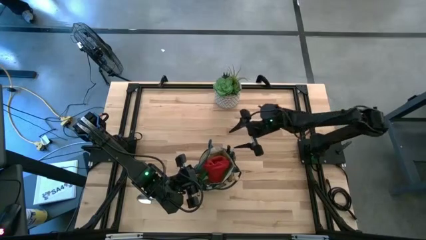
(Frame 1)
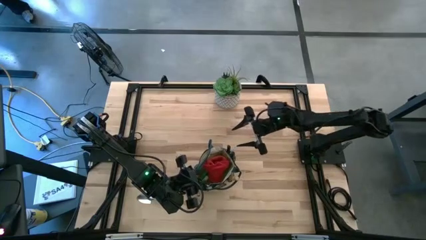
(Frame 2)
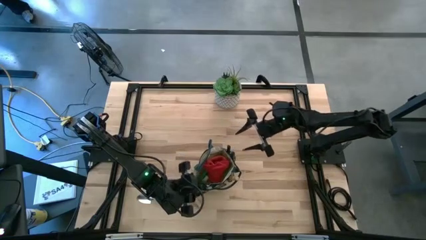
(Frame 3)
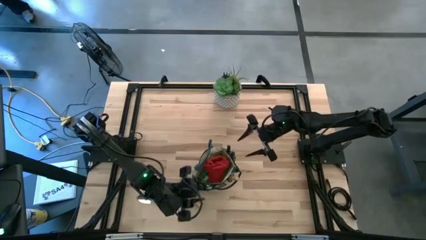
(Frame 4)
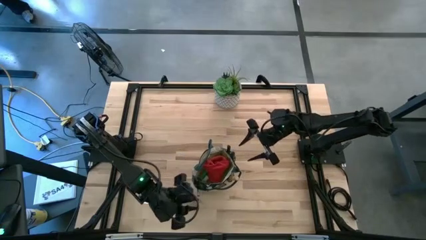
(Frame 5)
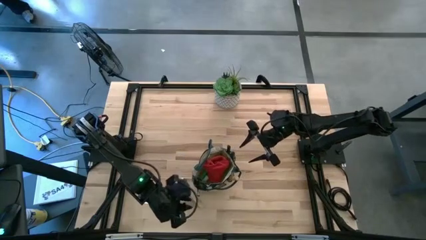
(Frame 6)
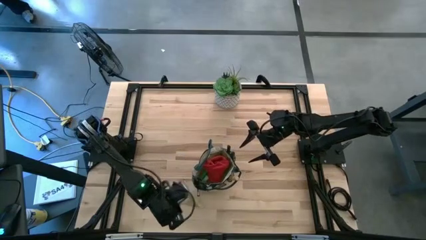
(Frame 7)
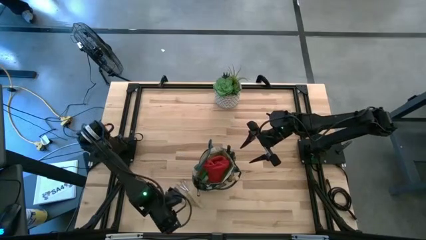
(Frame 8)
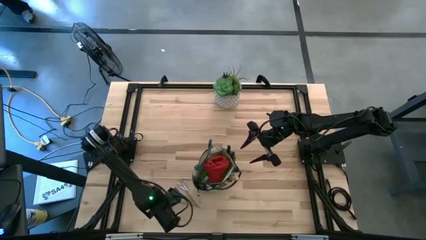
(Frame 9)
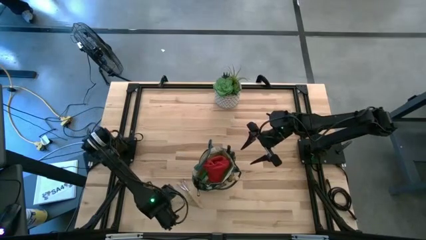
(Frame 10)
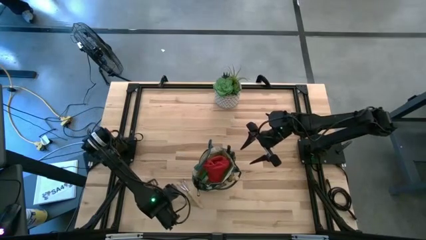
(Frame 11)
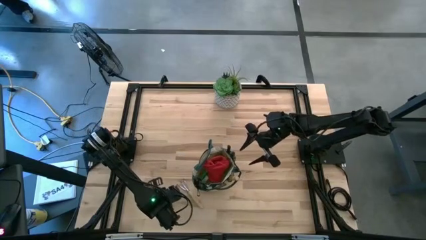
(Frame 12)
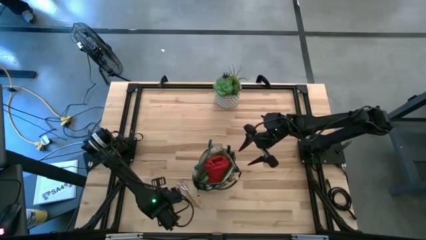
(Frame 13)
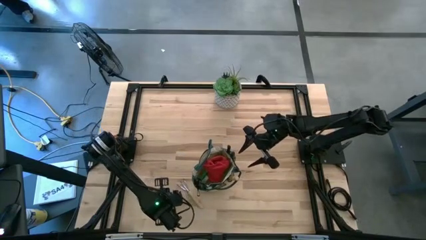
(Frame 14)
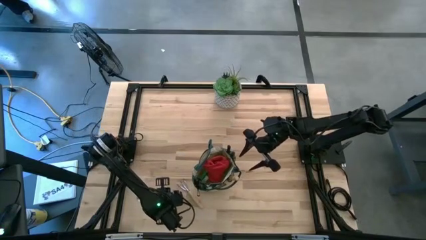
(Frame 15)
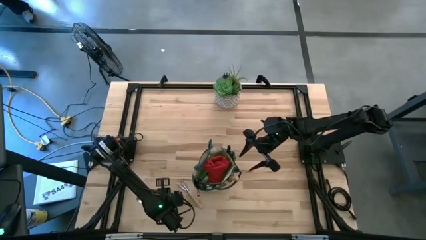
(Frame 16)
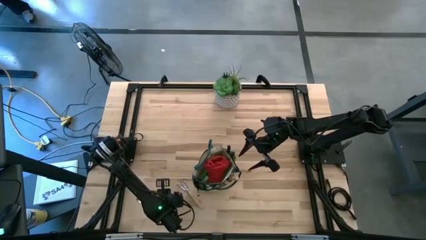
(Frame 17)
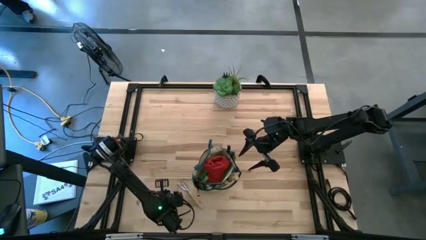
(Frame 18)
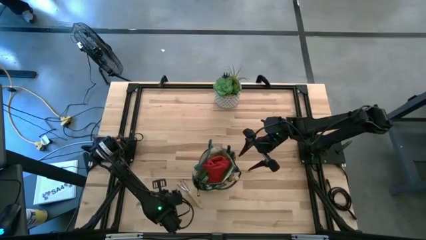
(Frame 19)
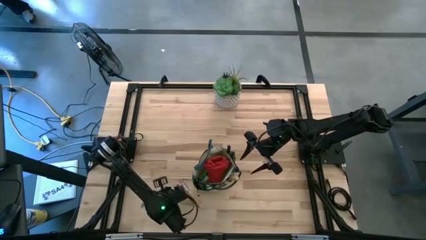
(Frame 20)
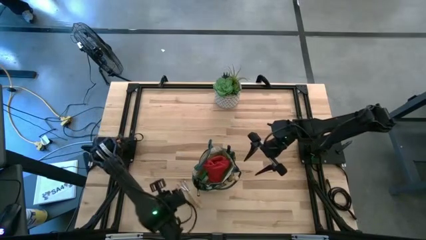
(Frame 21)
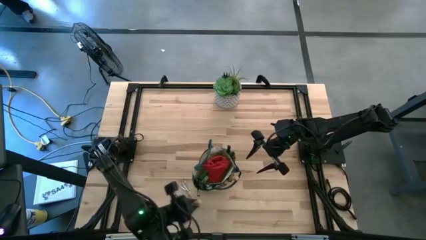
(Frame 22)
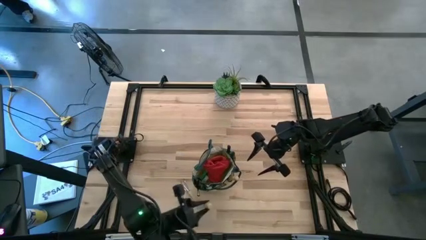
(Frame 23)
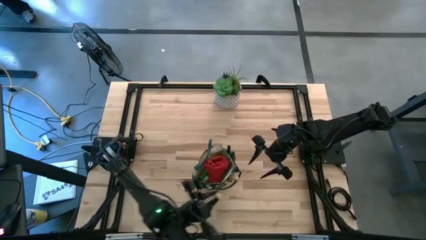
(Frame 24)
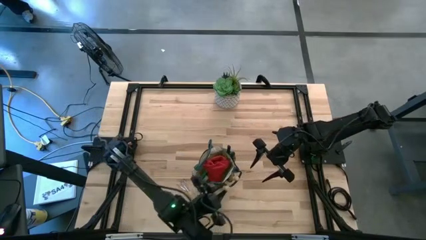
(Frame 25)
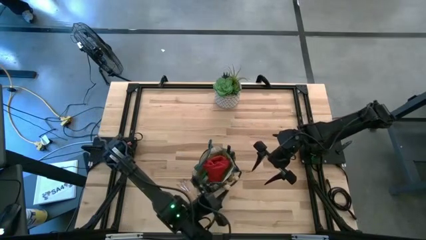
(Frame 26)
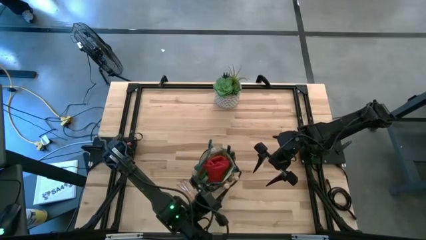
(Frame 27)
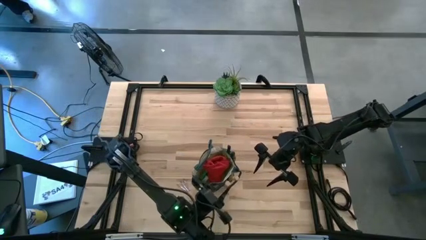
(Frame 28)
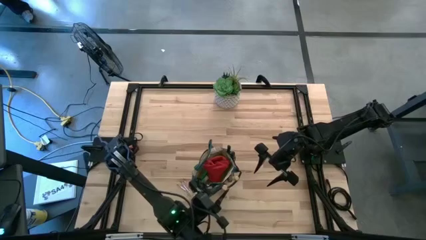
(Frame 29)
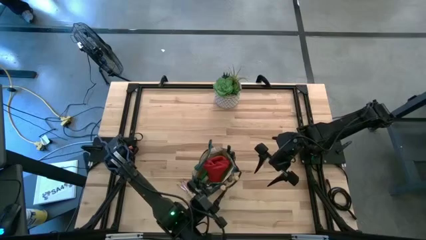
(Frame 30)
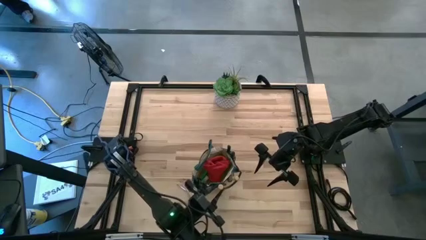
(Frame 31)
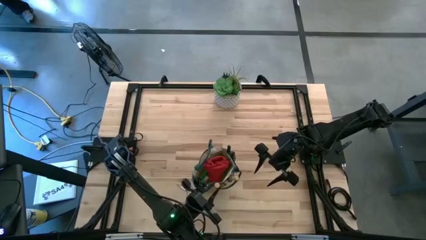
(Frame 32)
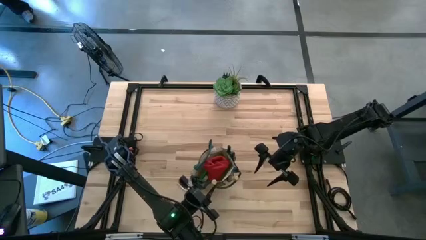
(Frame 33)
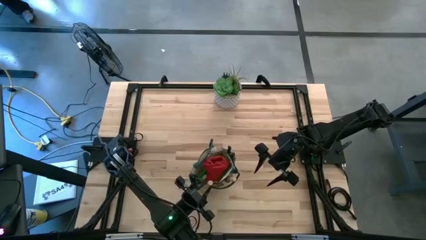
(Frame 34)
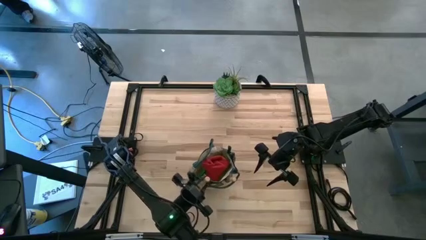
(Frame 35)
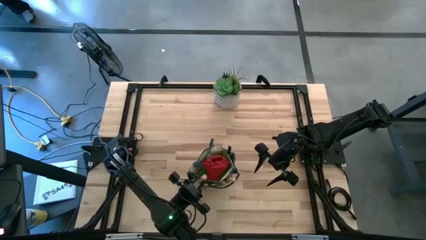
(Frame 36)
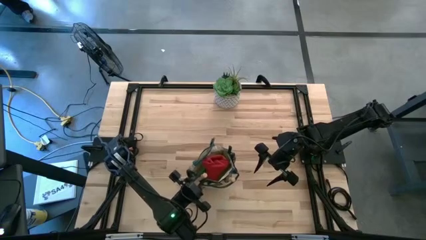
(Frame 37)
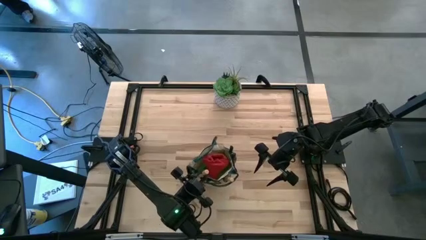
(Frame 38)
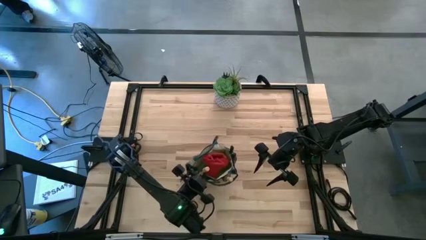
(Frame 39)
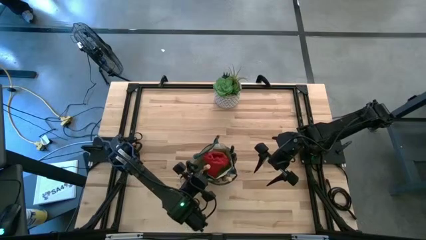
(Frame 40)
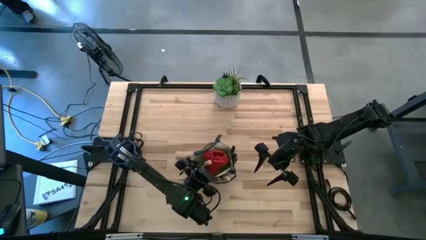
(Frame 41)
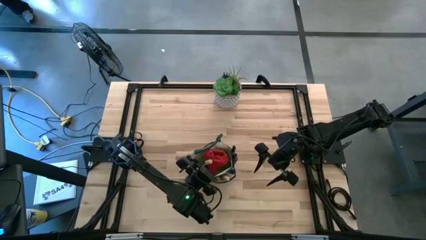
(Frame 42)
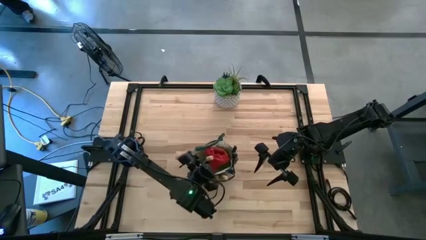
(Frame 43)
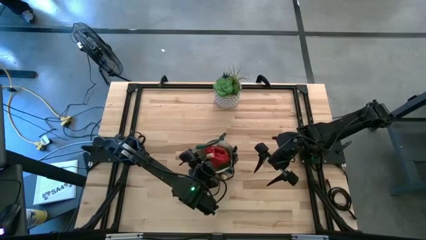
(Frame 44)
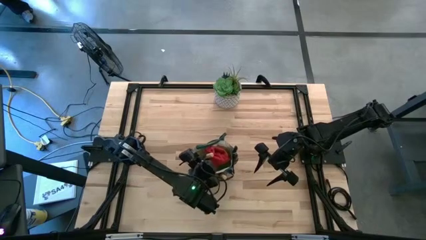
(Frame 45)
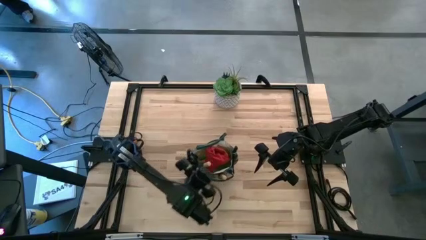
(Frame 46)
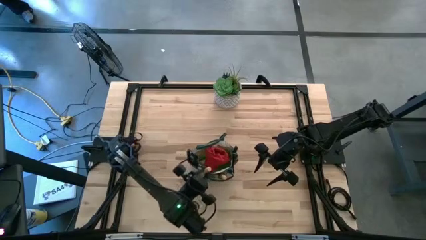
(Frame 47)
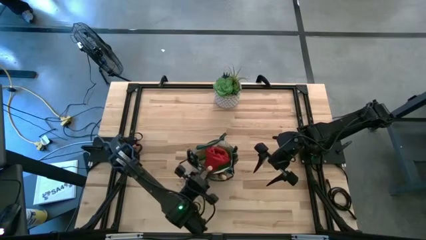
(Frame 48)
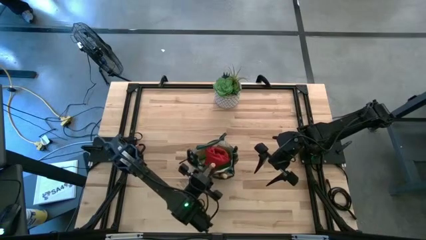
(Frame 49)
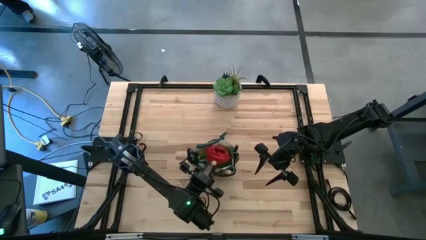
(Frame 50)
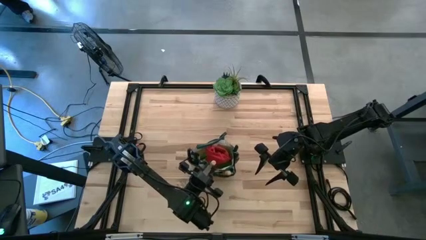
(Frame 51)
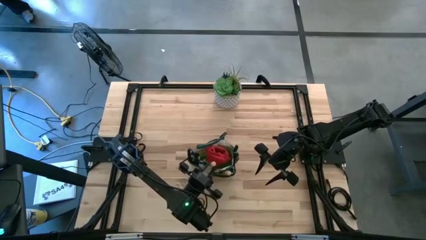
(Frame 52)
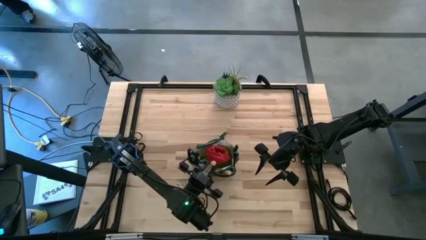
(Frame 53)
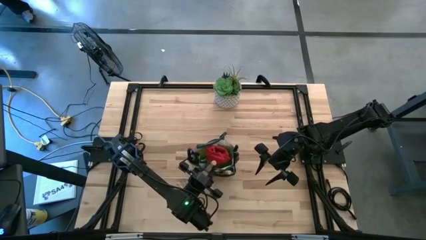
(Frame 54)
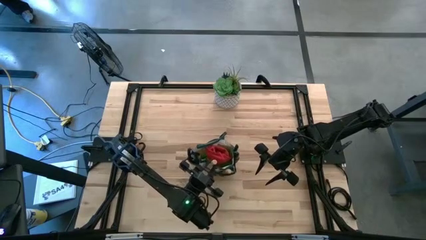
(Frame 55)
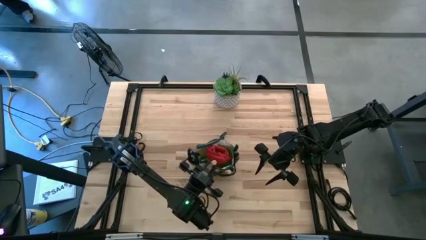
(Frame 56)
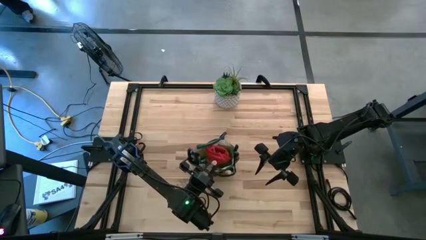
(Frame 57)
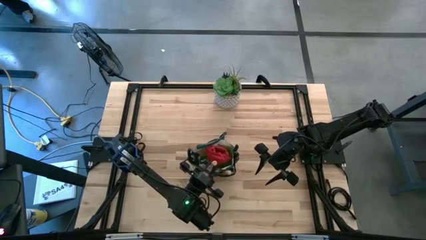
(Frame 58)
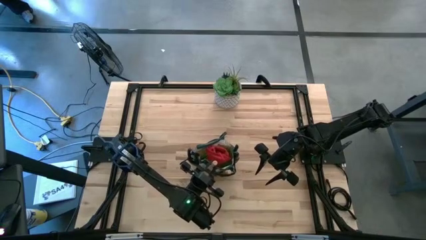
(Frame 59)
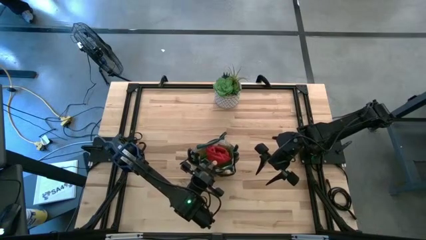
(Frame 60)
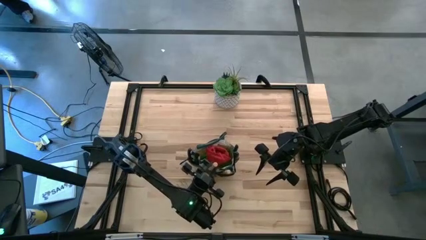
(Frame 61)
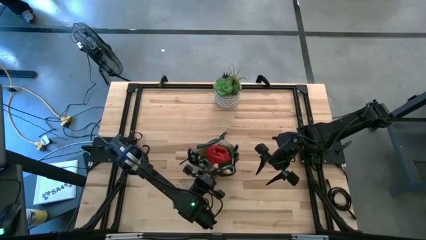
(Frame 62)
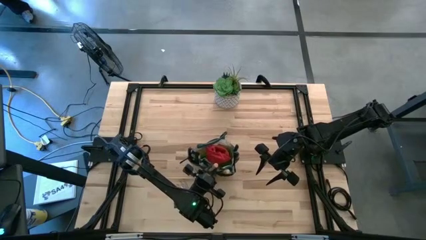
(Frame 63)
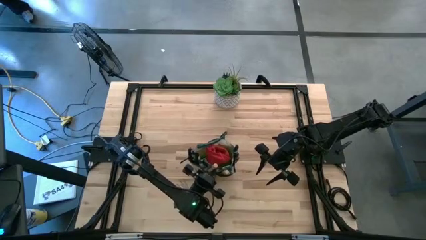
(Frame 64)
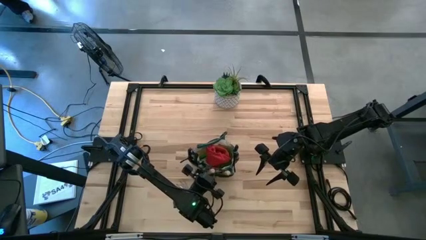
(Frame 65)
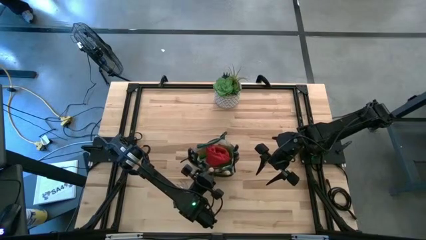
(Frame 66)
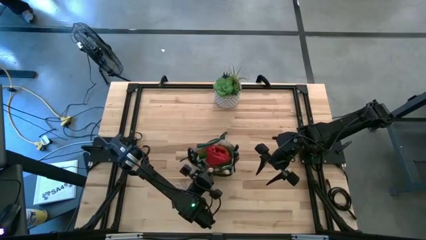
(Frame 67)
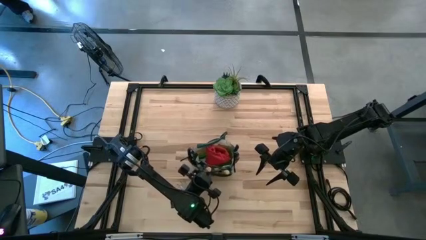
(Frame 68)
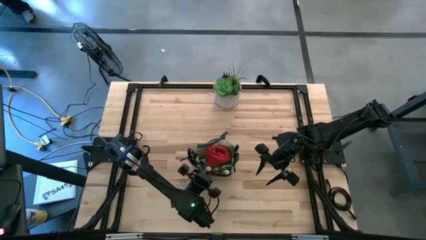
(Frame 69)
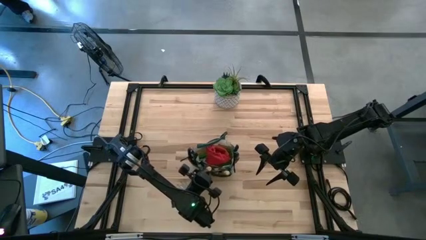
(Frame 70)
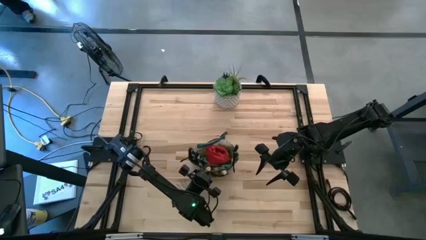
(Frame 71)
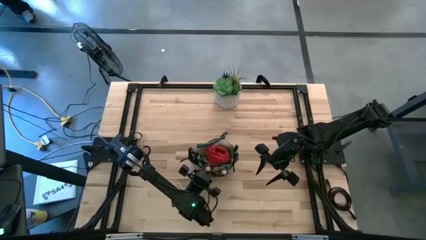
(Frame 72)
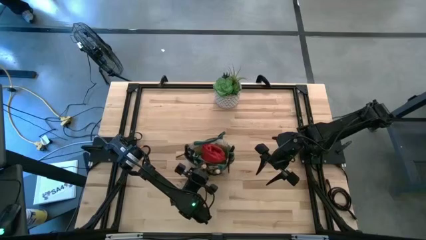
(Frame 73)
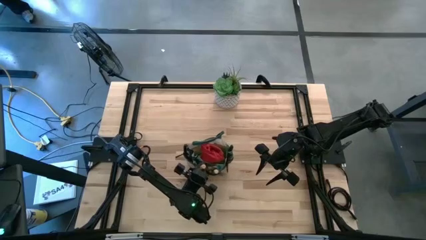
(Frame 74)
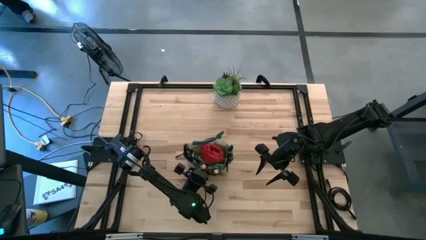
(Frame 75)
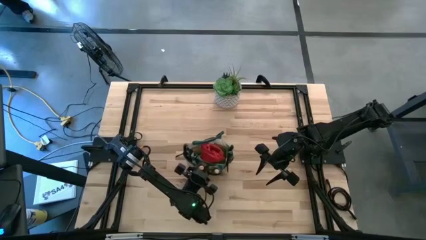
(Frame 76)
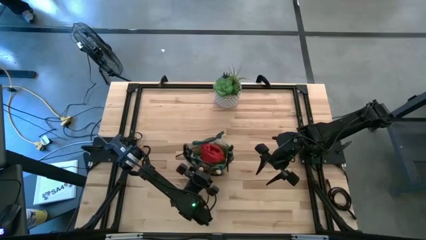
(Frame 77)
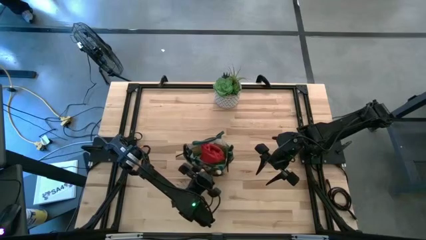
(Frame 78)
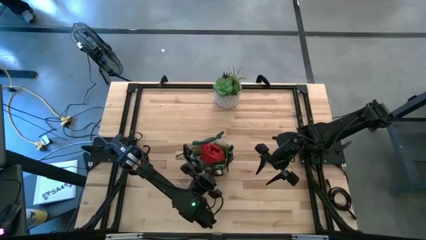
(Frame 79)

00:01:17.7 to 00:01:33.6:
Task: Pick & Place Garden tools in Gardening bag
Put the light brown trowel into the white gardening bag
